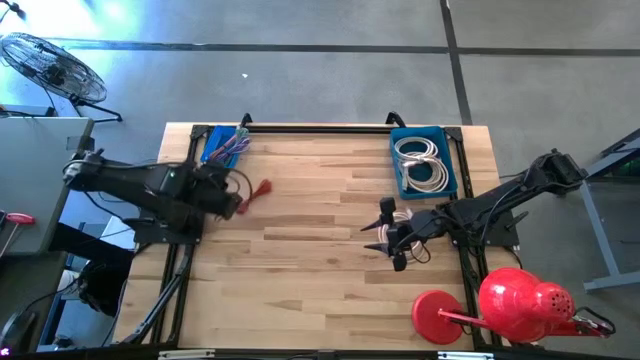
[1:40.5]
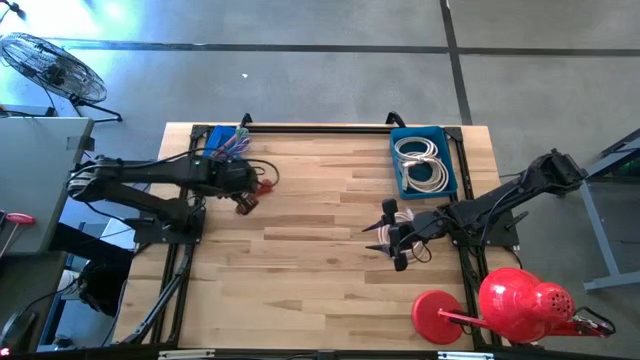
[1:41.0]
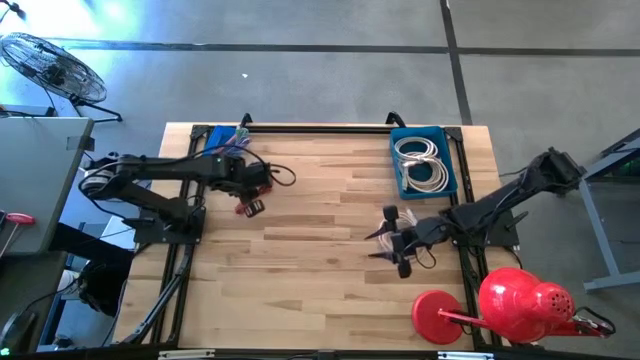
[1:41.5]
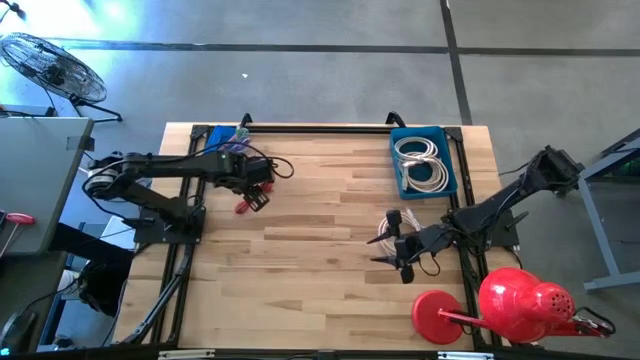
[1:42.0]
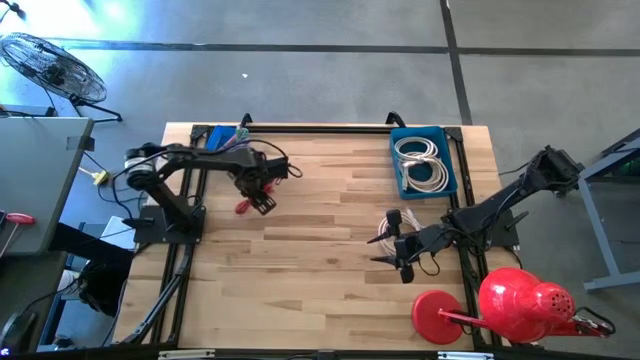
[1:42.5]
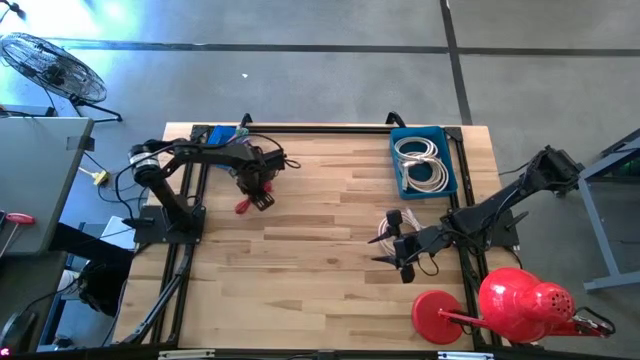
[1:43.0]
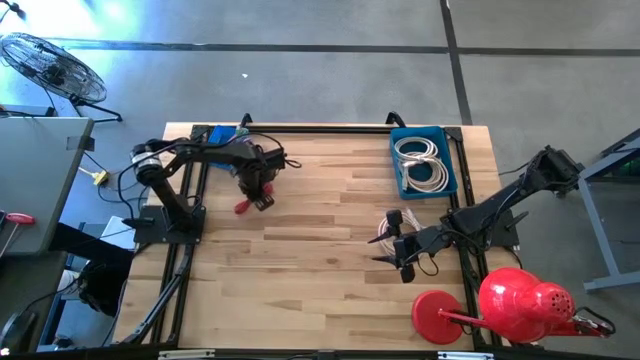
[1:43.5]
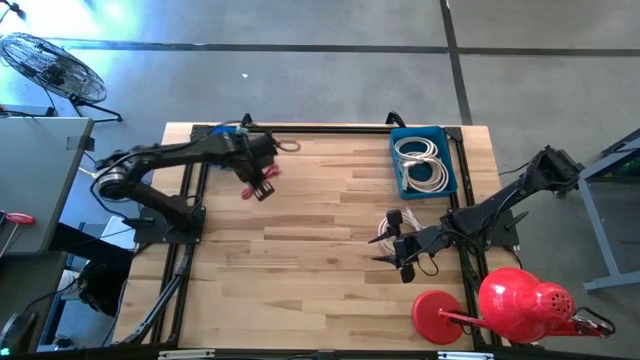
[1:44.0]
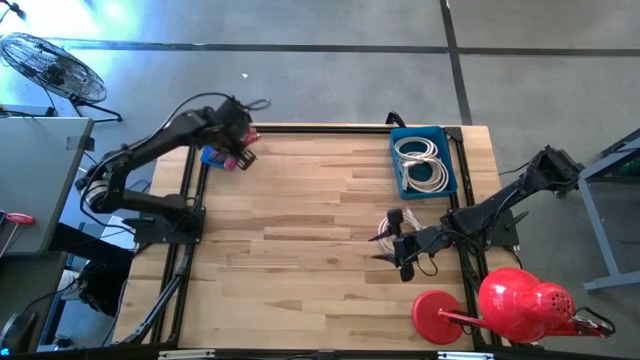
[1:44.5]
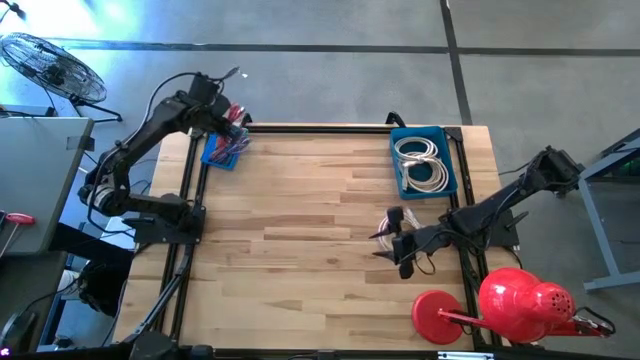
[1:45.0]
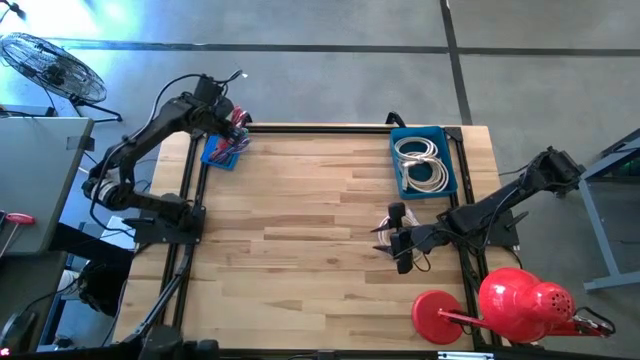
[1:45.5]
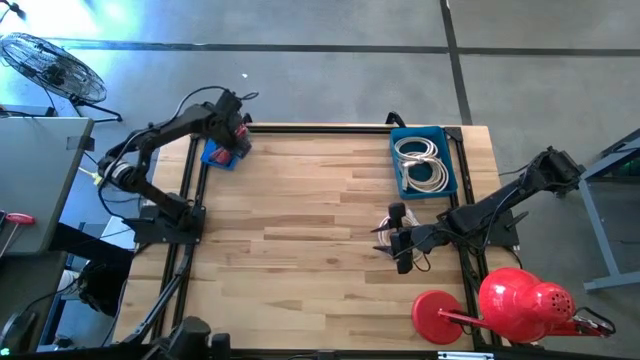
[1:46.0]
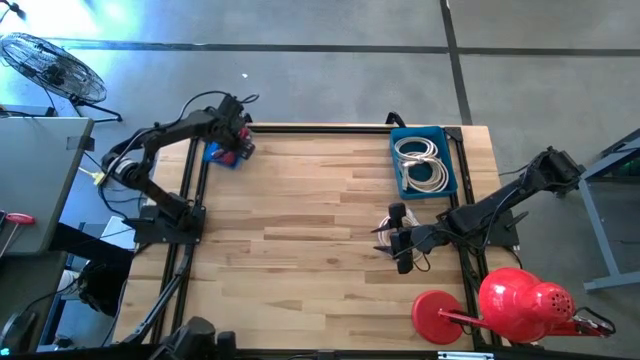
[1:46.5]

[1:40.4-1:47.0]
Task: Pick & Place USB Port
Put the orange USB cable into the left blue bin

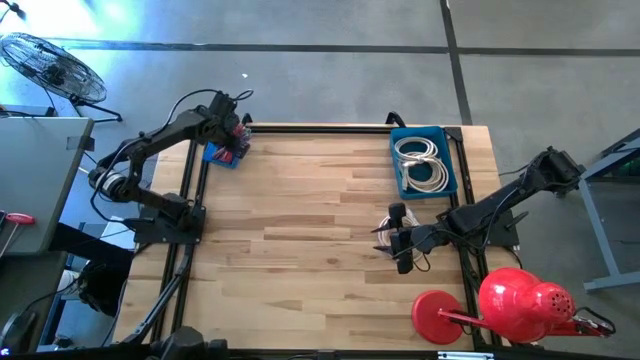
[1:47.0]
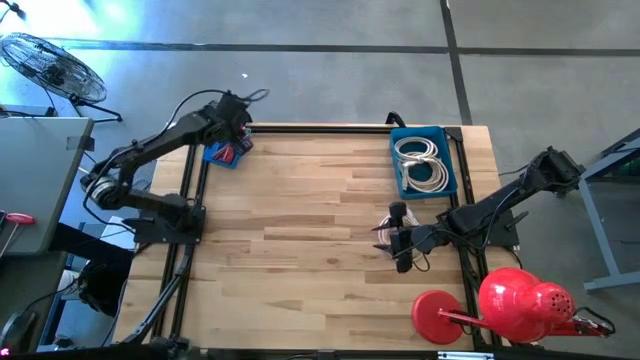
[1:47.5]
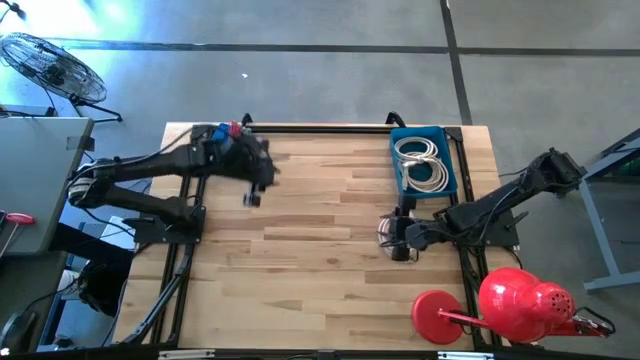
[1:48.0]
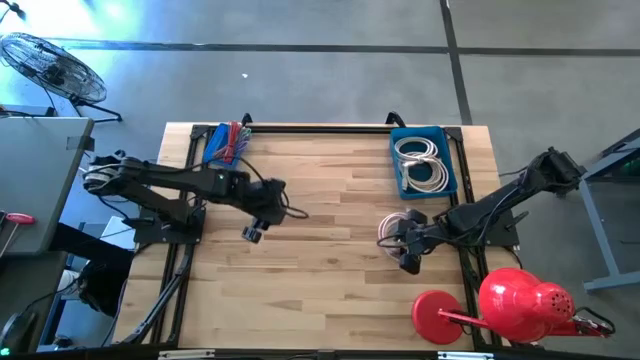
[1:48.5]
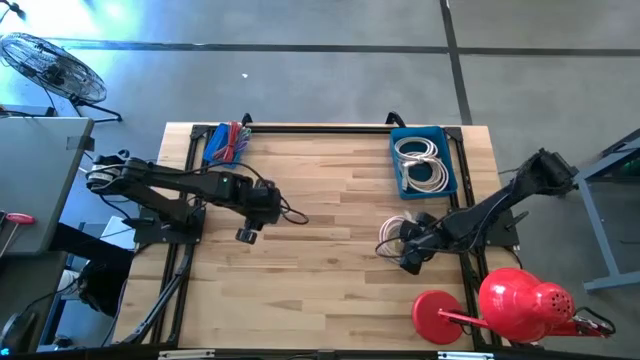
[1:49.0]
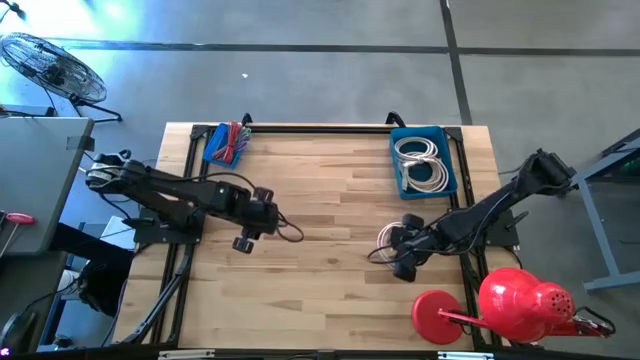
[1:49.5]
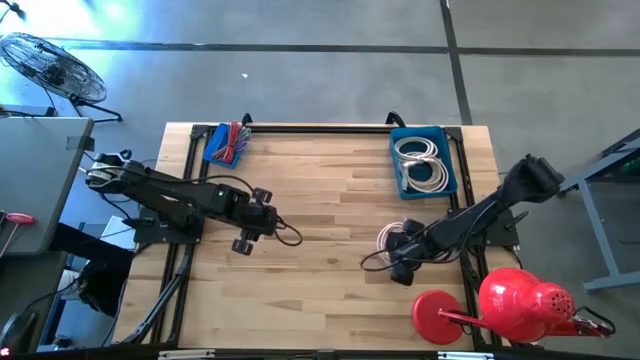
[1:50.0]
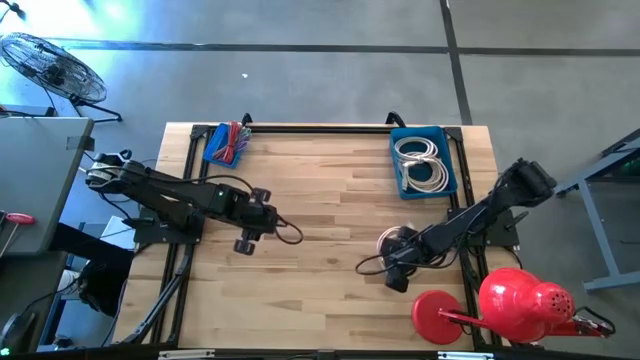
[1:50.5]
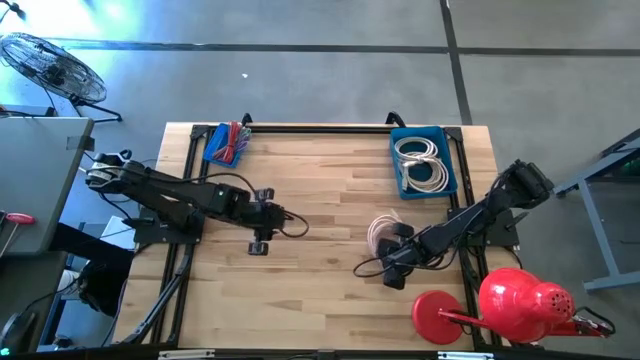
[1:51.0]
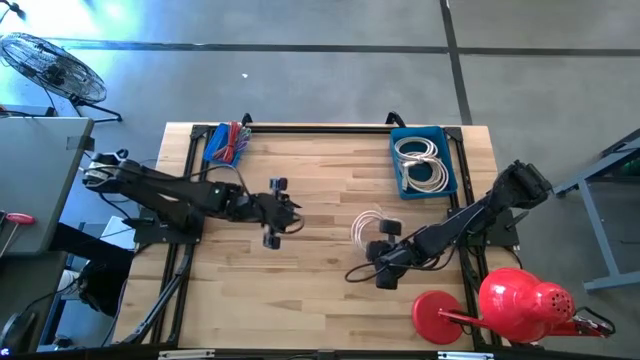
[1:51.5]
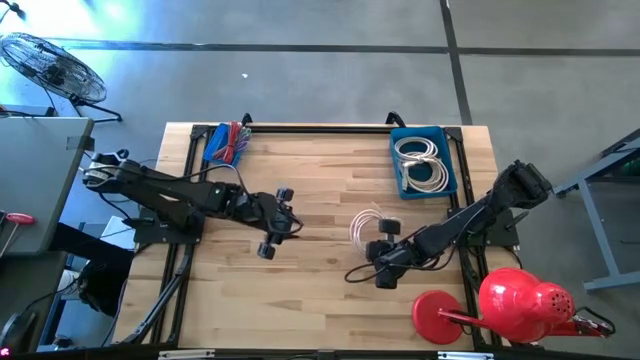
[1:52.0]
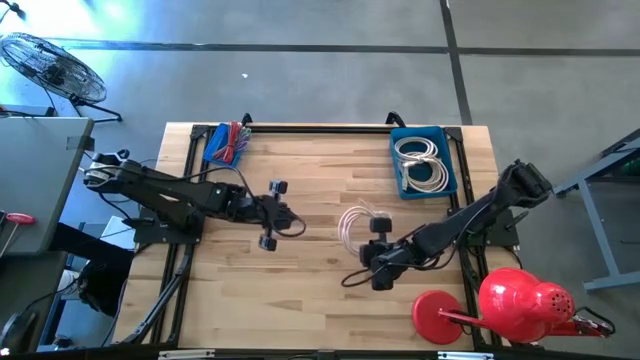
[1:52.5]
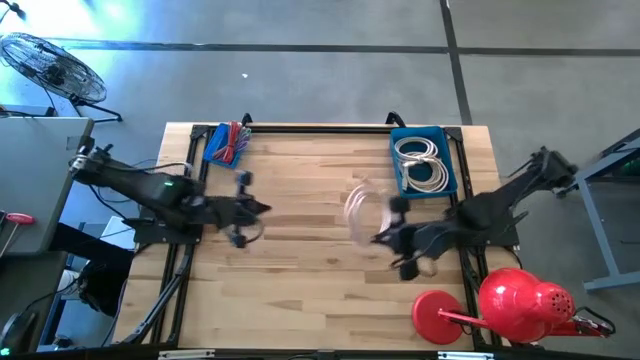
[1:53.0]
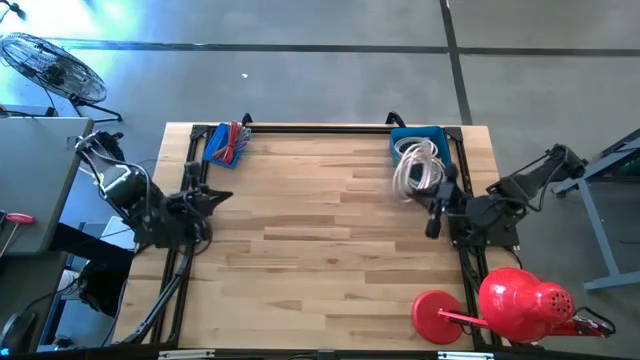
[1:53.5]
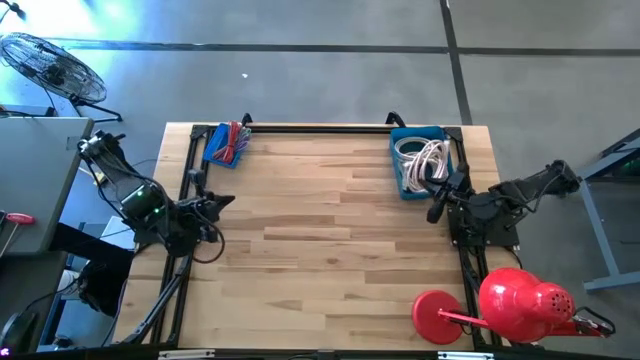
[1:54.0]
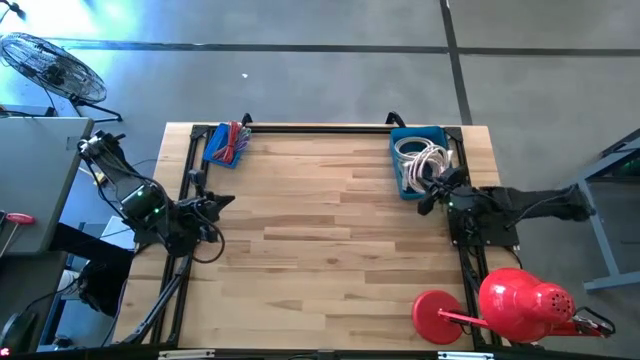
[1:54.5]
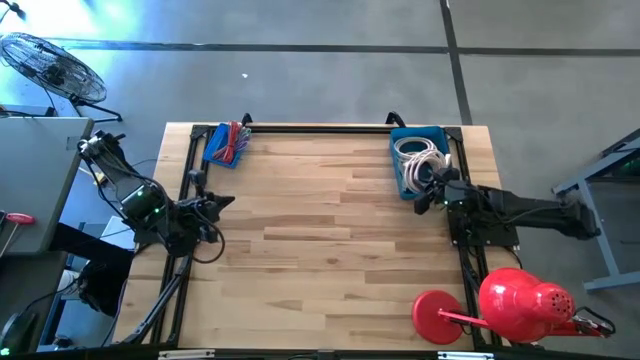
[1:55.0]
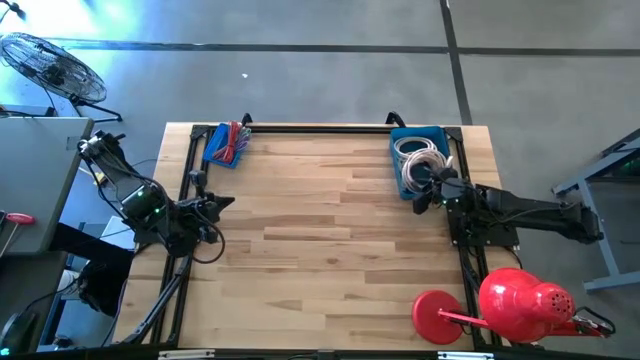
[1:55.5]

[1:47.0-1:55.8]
Put the brown HDMI cable into the right blue bin

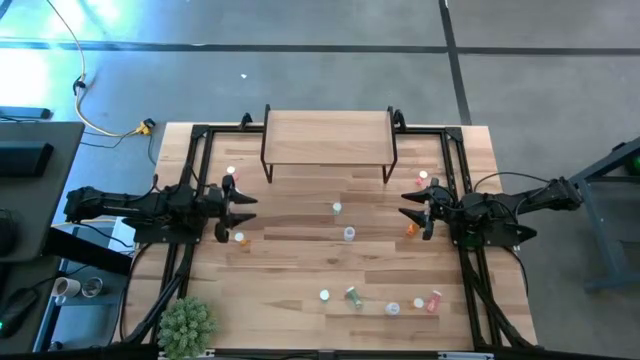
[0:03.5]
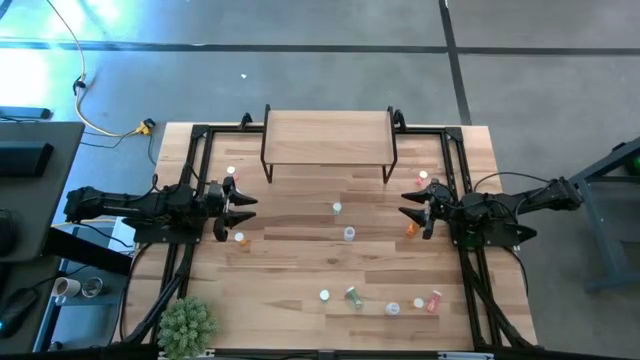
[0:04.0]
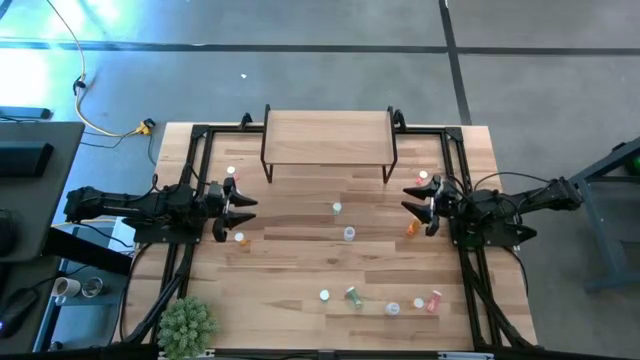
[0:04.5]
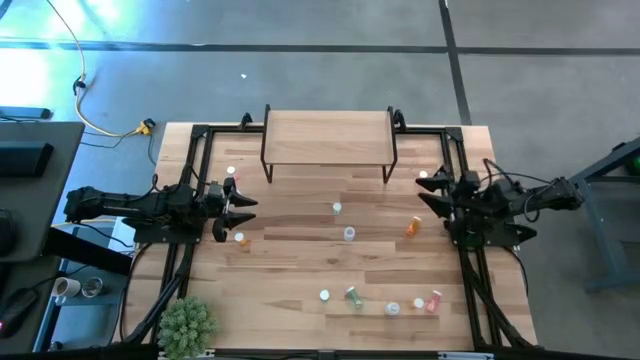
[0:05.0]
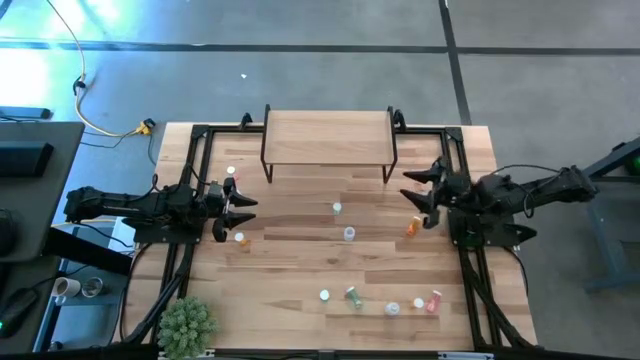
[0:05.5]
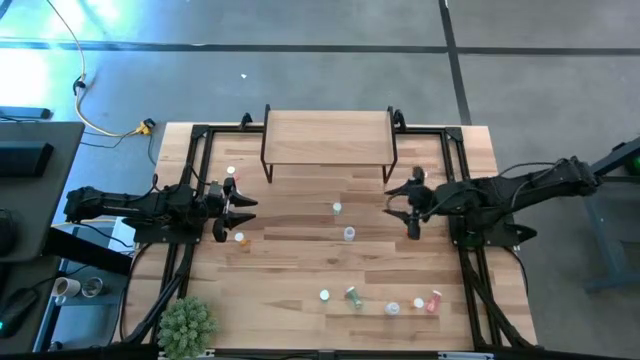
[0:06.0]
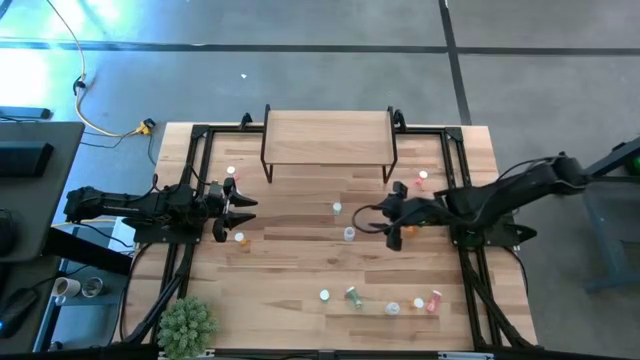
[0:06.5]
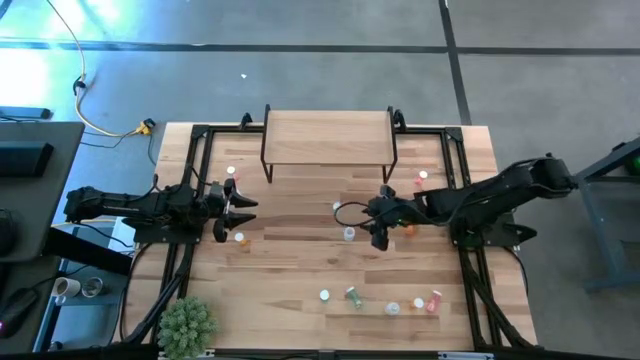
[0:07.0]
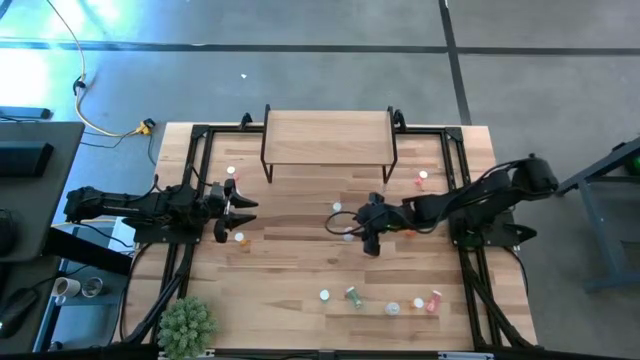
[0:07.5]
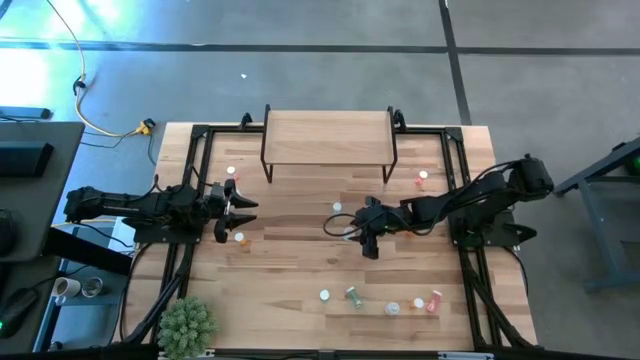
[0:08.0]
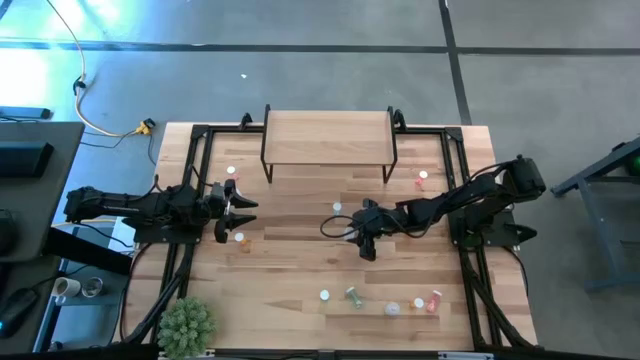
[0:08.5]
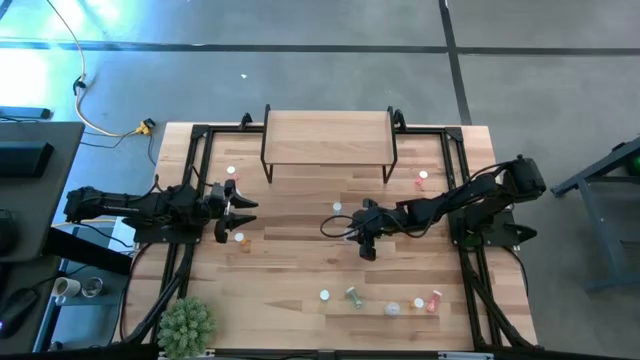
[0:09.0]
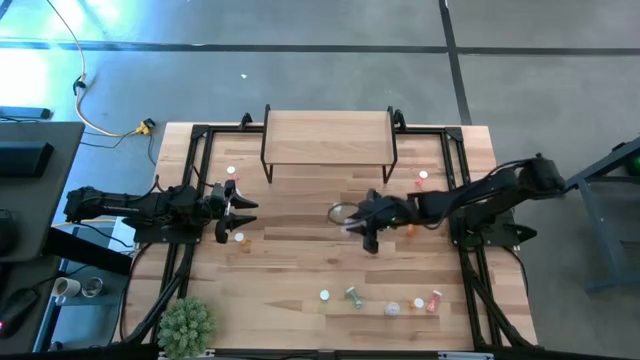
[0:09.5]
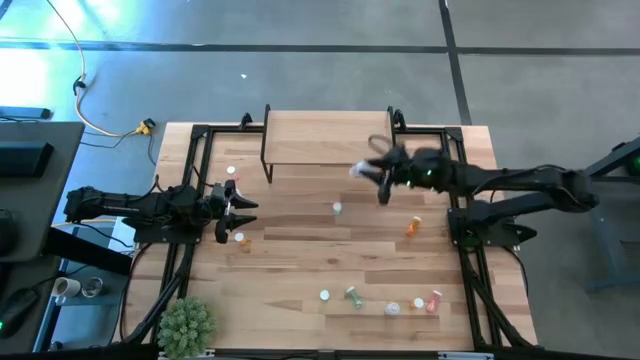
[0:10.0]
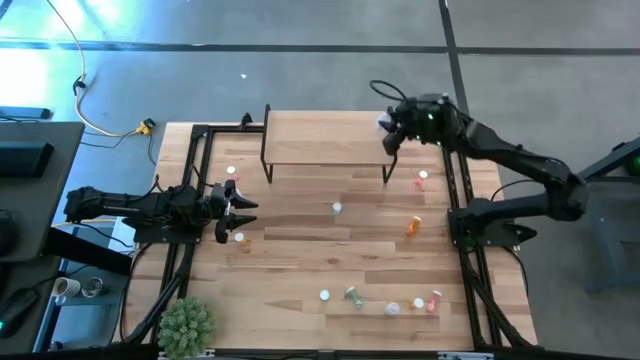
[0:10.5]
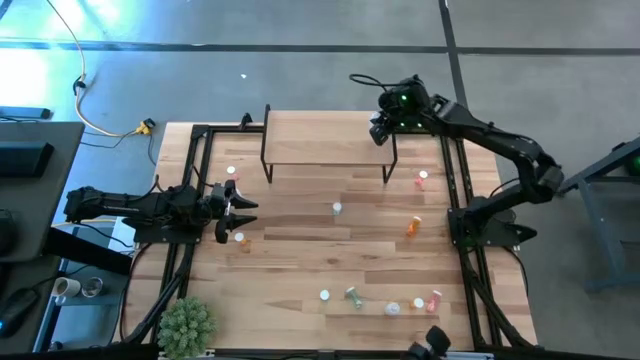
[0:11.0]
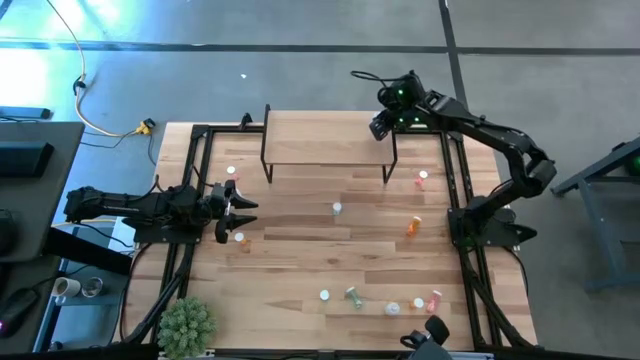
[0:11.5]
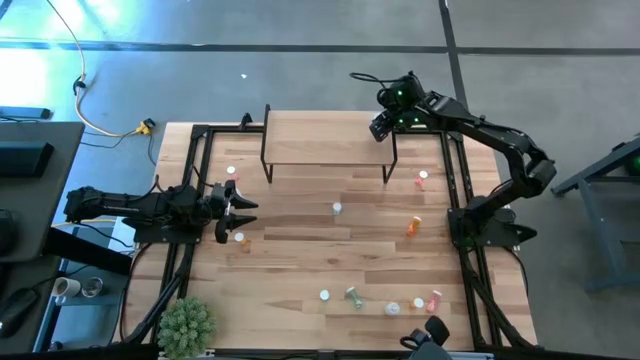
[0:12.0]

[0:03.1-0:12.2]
Task: Pick and place medicine bottles onto shelf by color
Put the middle transparent pill bottle on the shelf
